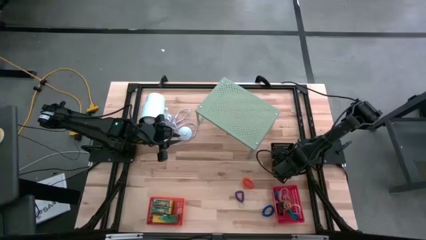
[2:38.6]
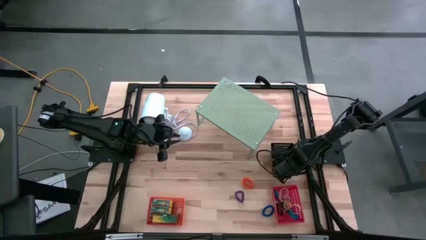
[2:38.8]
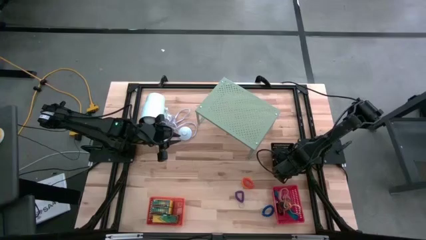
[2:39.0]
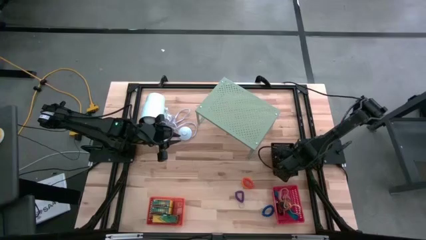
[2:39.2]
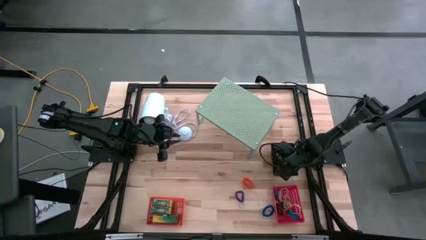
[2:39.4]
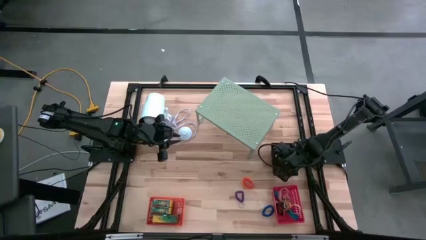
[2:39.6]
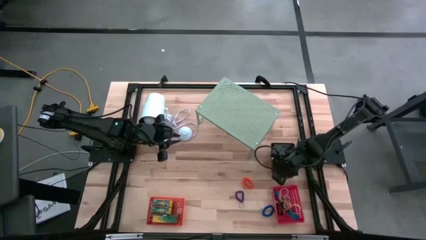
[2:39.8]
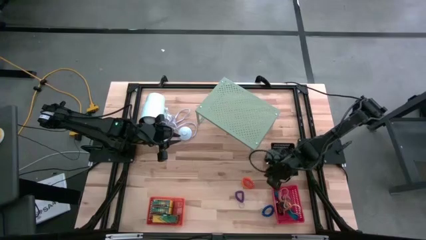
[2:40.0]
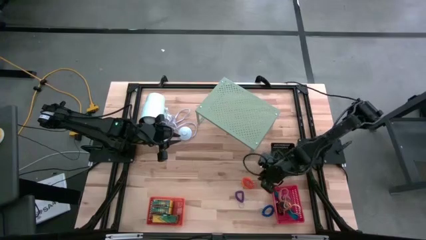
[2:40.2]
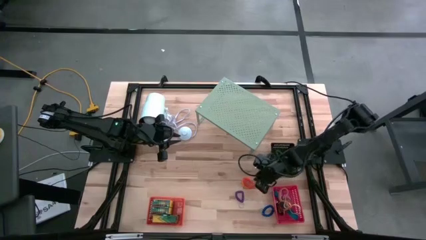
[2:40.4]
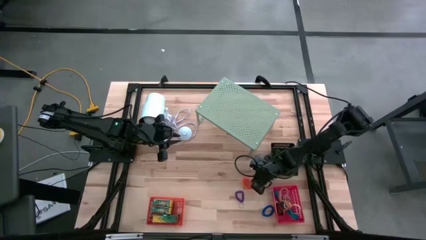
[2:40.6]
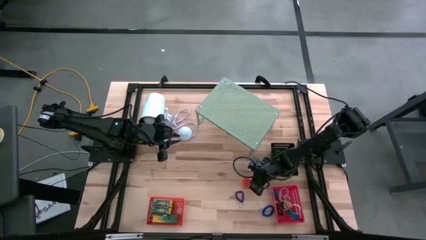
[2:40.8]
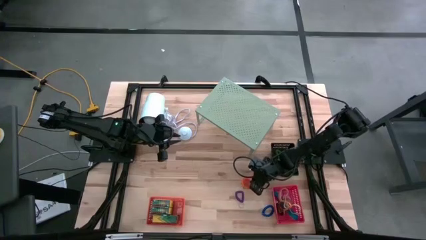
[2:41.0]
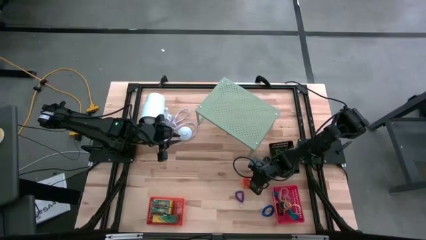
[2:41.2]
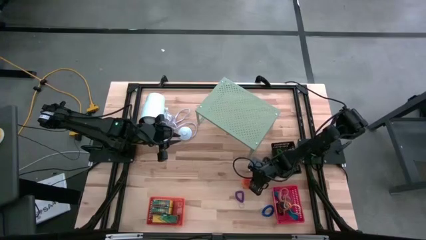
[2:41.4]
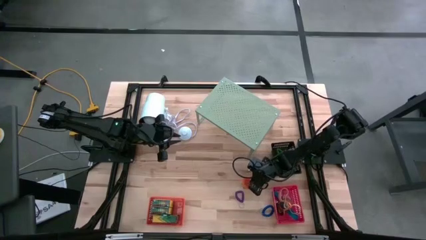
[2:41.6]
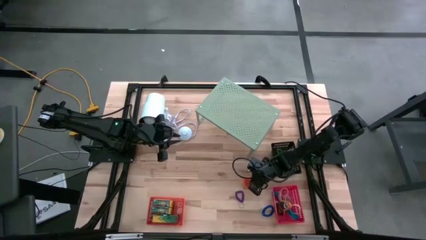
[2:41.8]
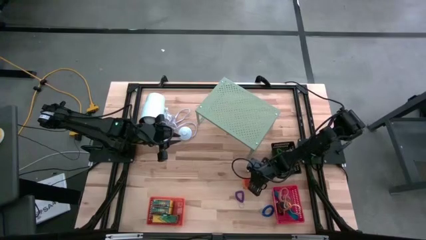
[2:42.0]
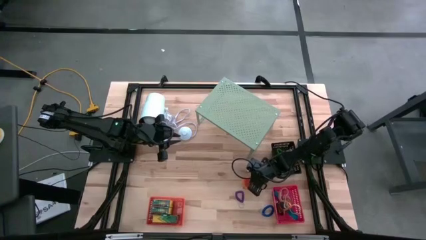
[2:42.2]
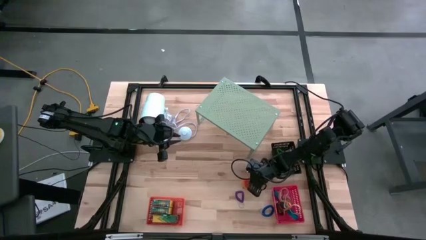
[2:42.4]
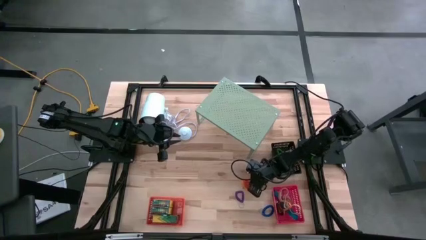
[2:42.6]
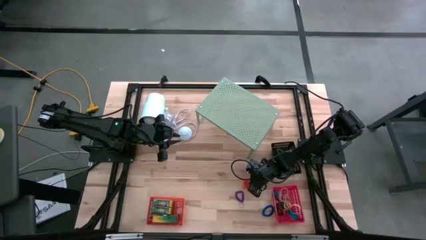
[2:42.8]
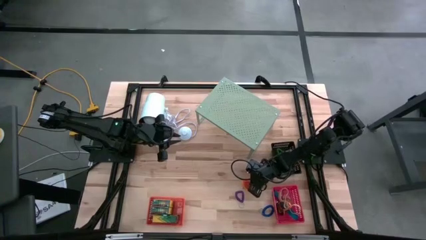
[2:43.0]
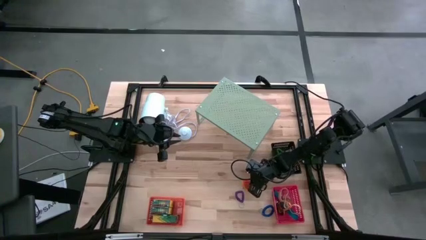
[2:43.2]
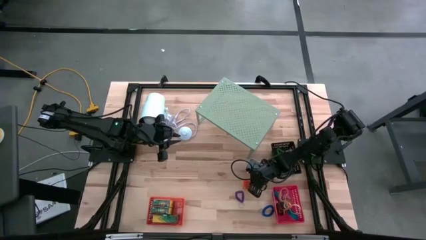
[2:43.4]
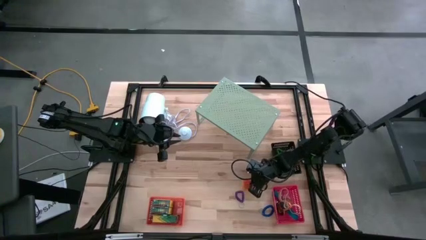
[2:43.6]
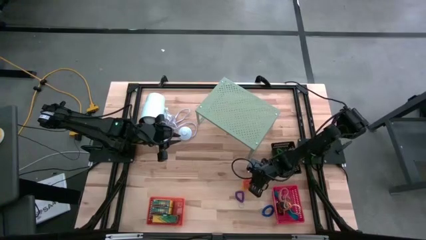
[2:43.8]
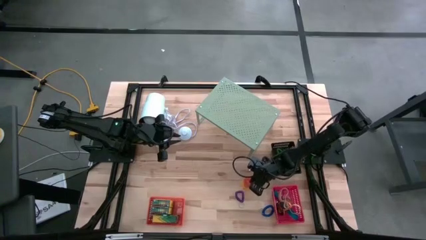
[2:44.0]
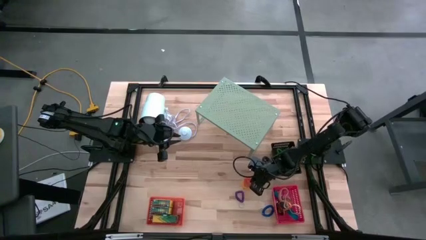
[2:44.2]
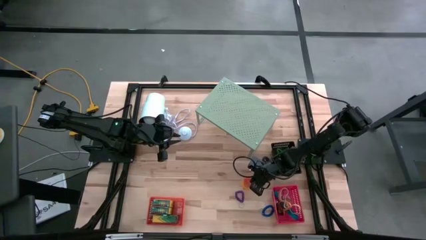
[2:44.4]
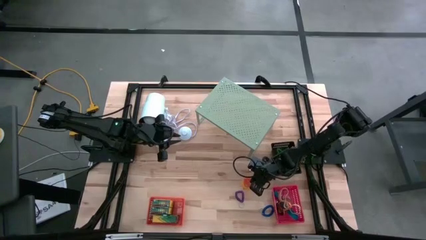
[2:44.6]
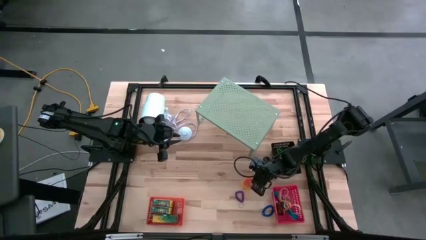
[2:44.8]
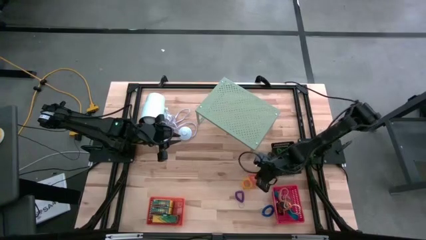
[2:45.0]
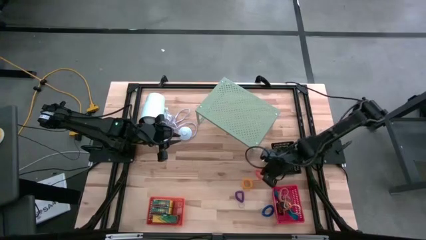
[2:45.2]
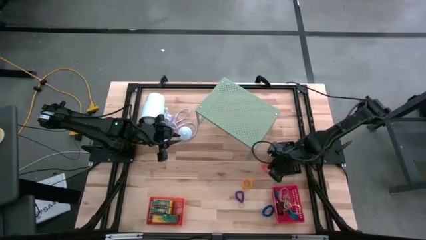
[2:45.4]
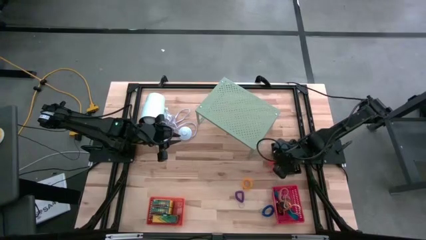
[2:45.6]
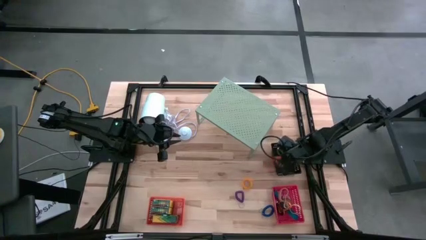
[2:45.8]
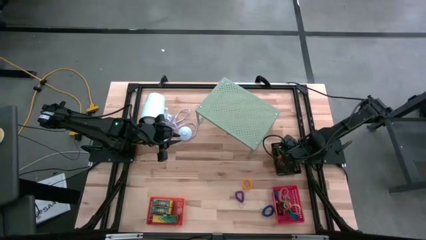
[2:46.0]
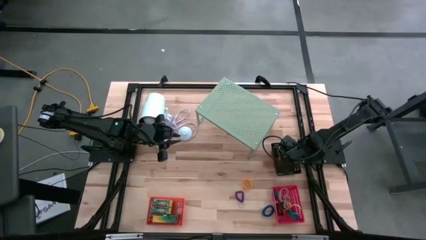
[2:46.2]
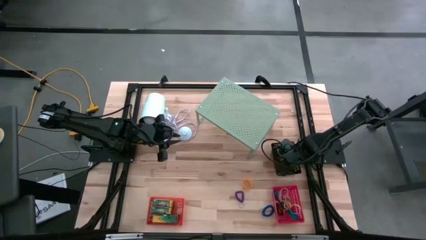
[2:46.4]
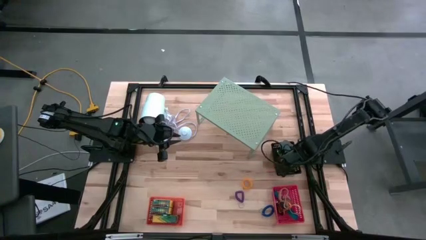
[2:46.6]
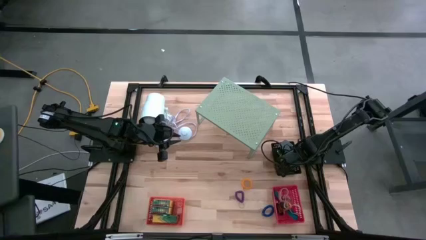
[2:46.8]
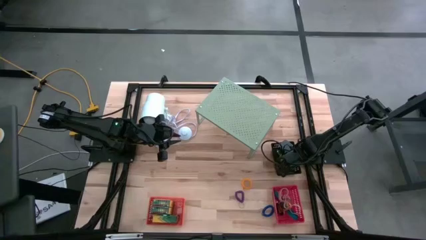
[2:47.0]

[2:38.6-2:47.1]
Task: Pick & Place Office Desk Supplies
Put the orange spring keychain into the black bin

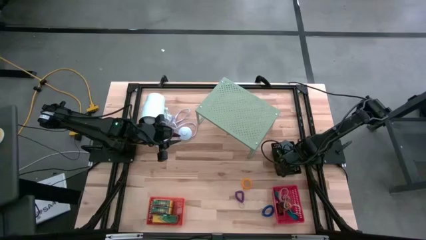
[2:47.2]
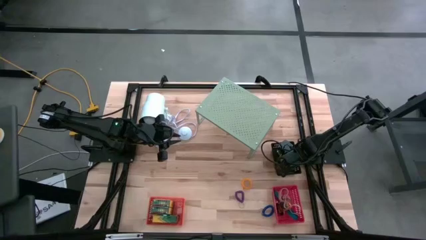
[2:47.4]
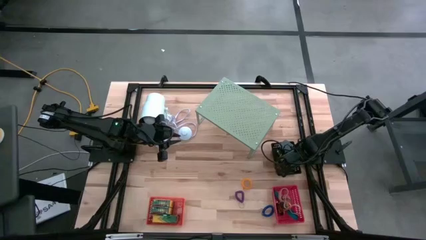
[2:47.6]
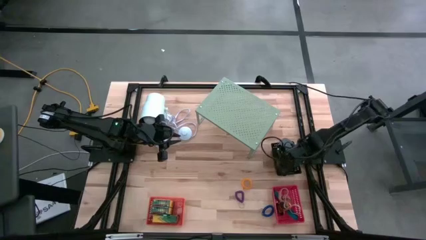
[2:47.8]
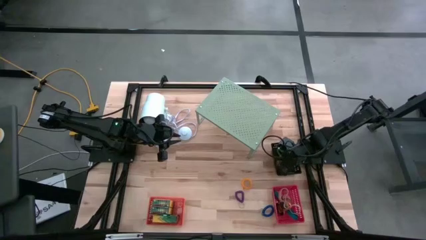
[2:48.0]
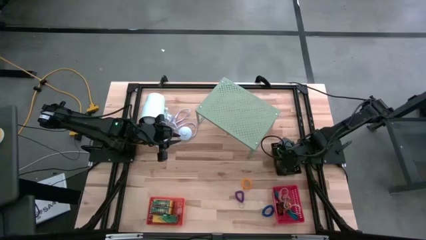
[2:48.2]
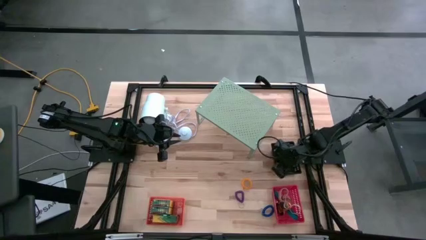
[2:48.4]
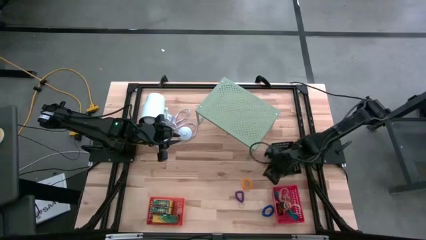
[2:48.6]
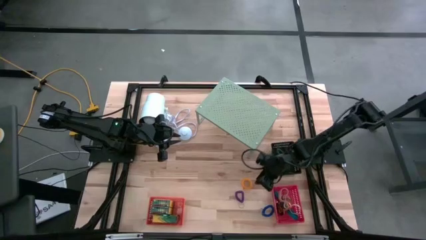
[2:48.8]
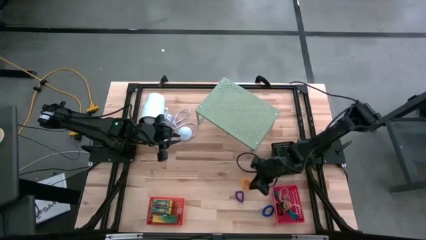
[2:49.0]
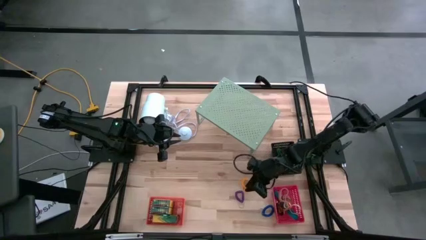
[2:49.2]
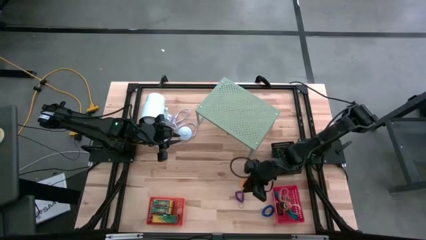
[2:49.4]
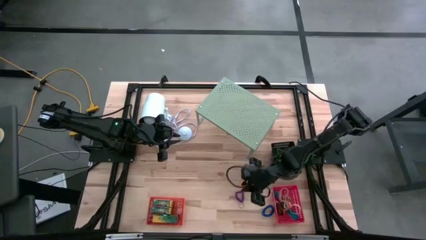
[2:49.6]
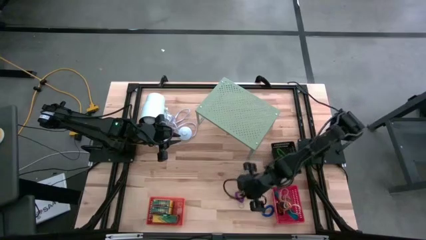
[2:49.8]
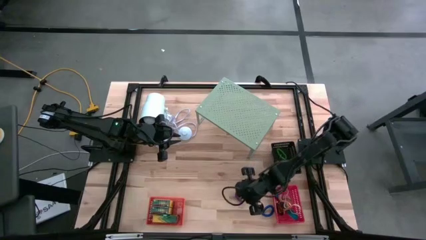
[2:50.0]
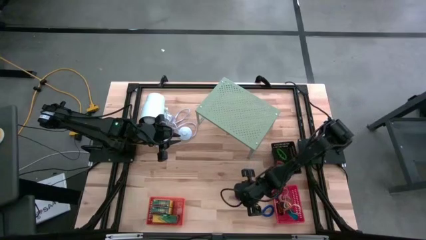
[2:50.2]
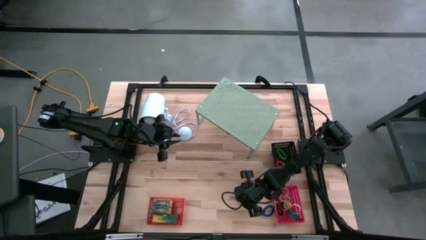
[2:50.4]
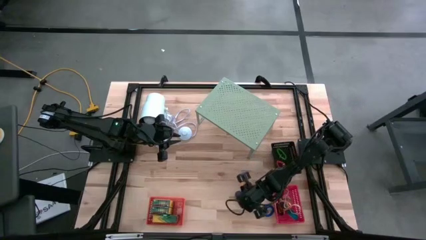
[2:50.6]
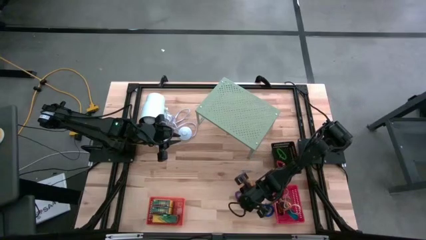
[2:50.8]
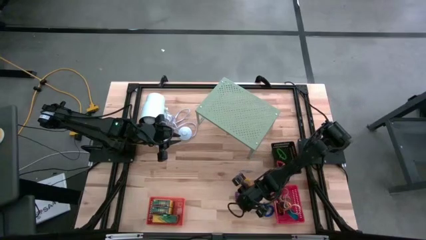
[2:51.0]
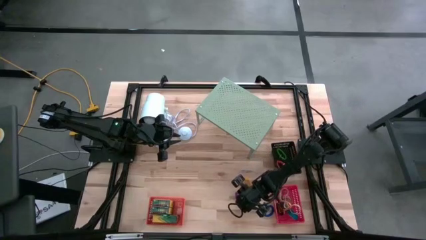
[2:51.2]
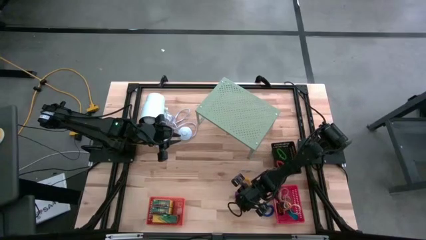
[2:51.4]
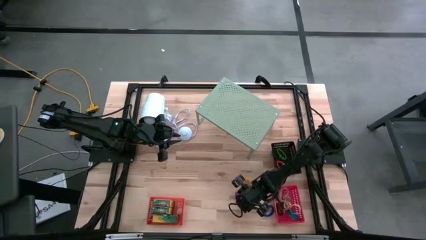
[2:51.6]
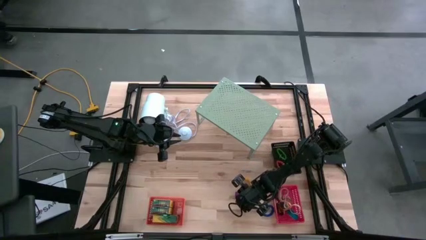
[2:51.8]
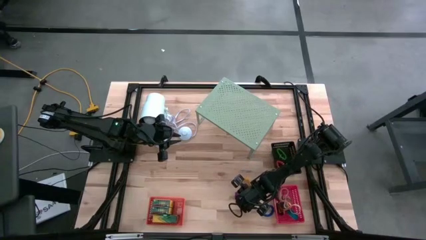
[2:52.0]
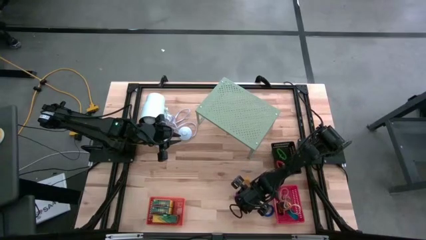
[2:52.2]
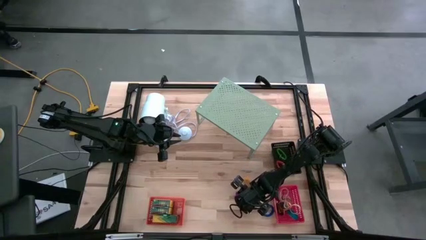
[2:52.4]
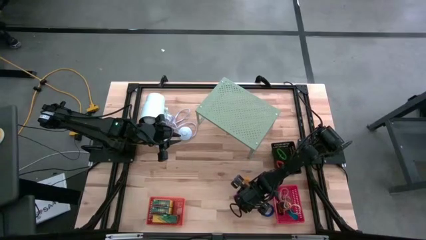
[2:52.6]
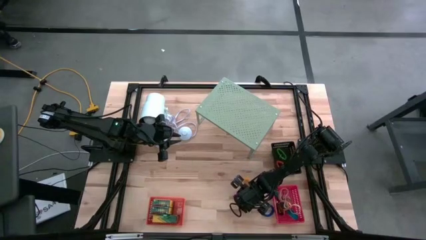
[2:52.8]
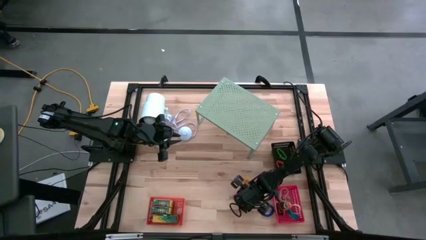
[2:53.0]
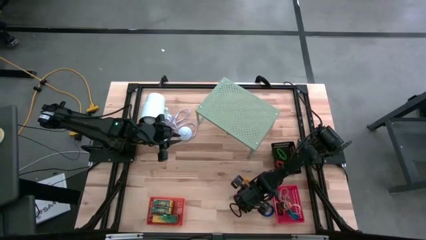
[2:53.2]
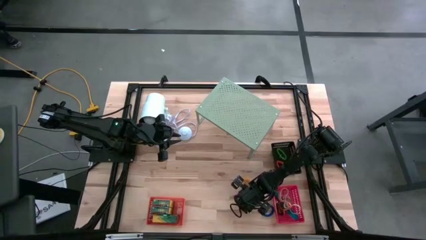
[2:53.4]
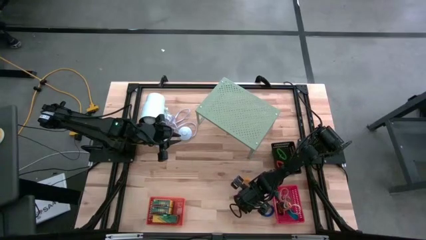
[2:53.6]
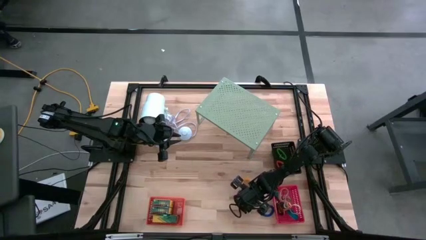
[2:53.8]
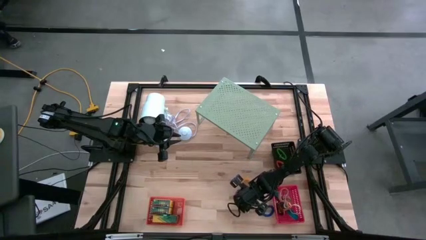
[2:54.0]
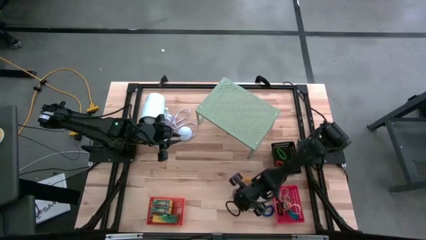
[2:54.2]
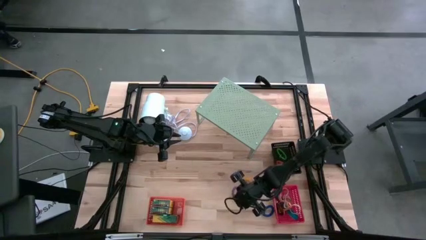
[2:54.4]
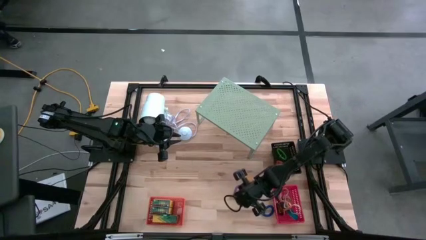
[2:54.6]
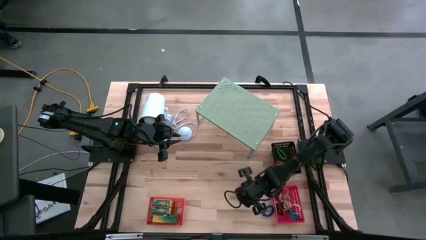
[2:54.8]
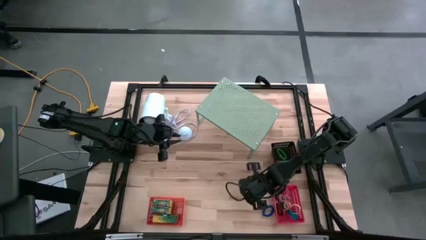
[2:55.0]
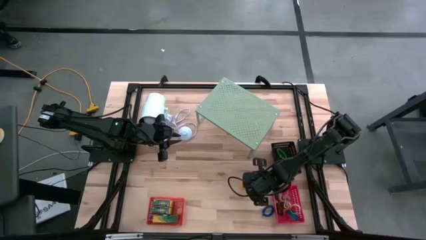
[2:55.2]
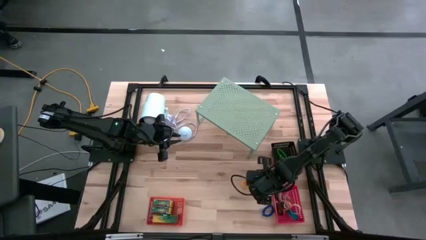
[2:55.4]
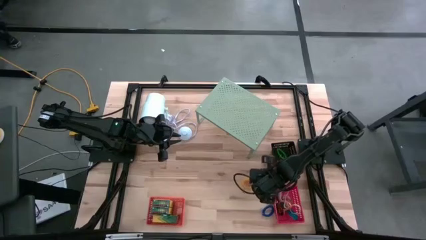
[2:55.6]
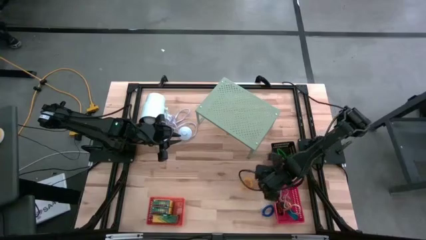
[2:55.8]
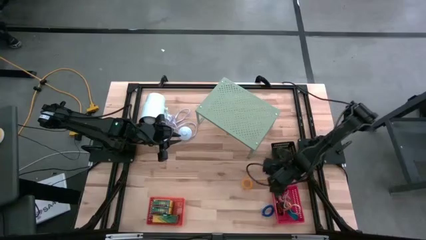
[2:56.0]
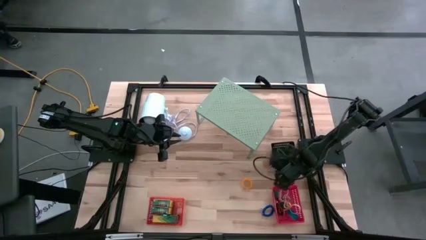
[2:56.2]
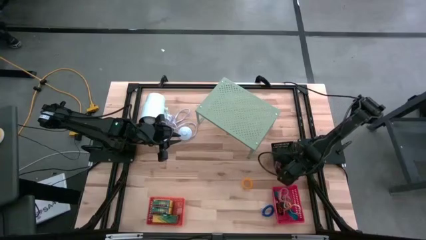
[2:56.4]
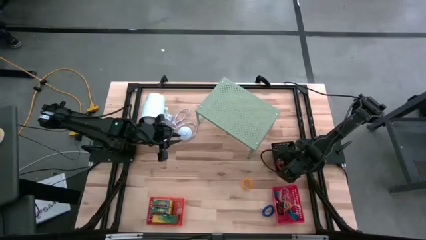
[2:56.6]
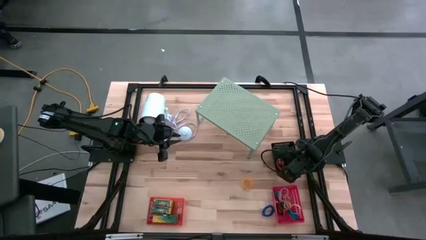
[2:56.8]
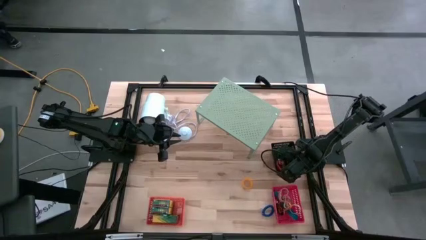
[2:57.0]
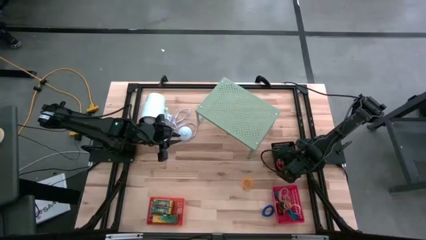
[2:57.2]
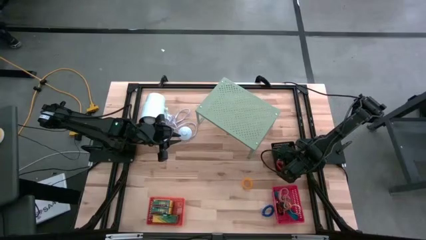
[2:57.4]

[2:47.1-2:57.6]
Put the violet spring keychain into the black bin
